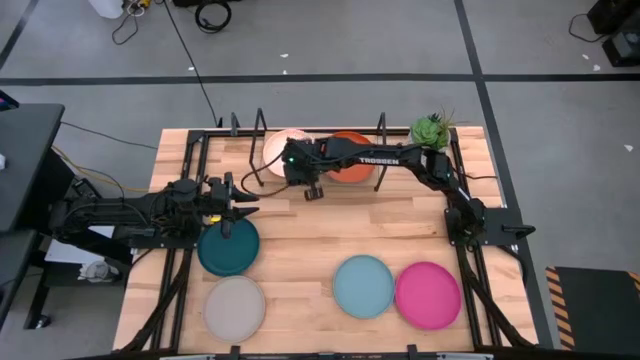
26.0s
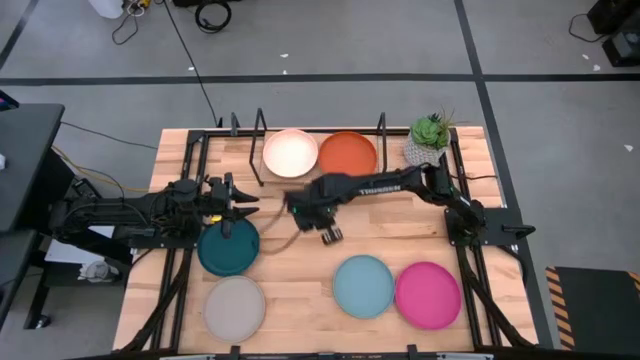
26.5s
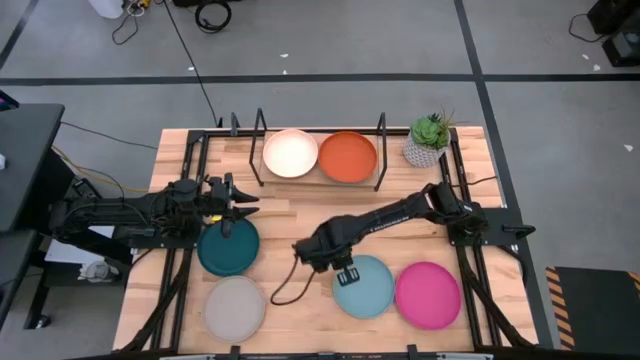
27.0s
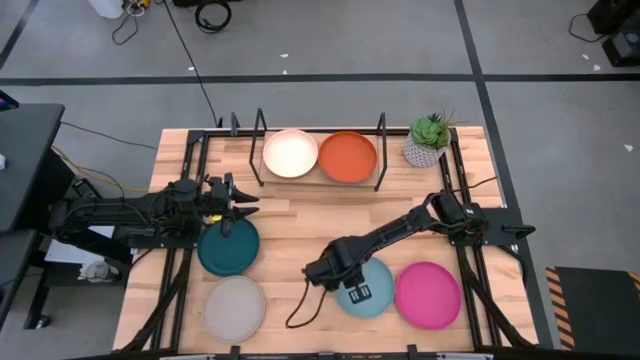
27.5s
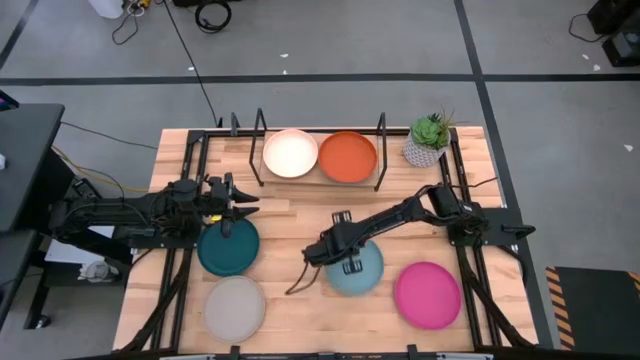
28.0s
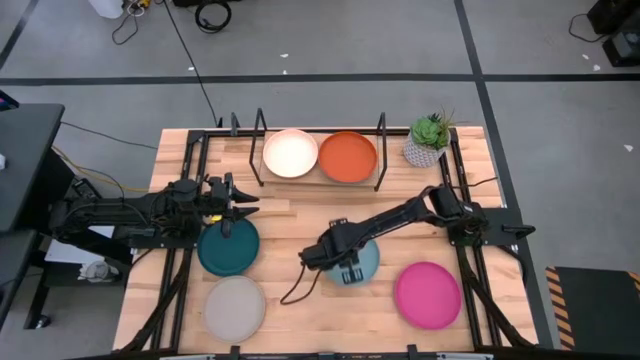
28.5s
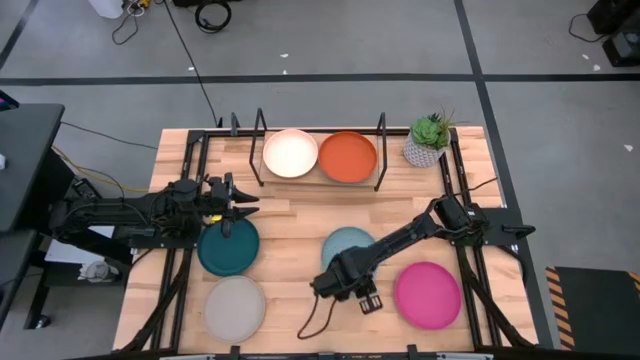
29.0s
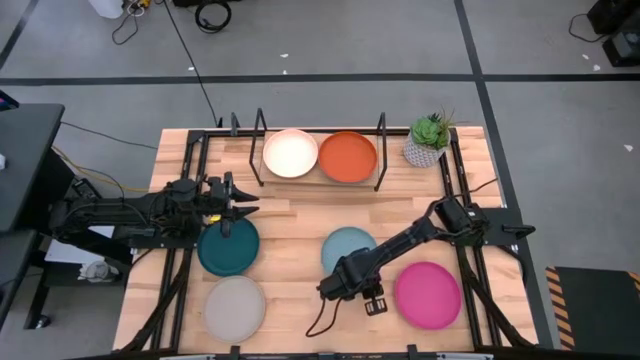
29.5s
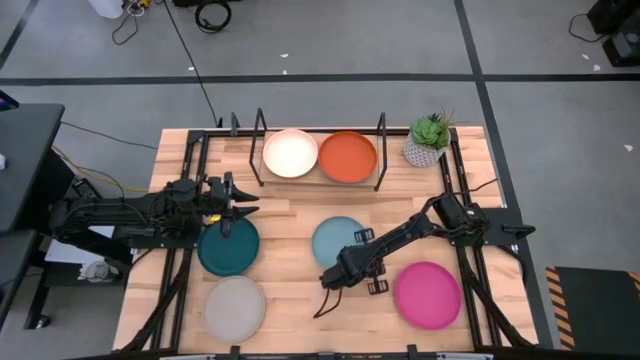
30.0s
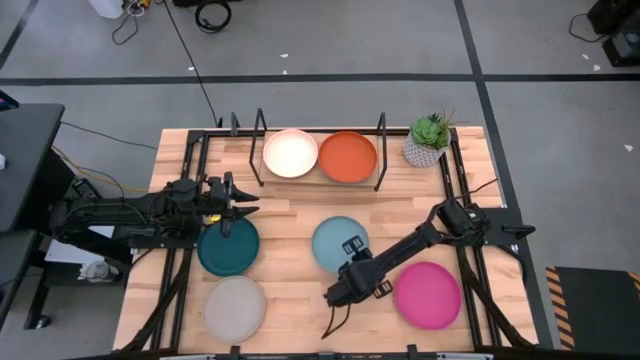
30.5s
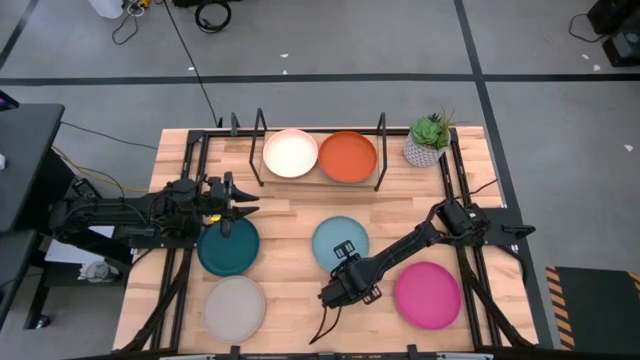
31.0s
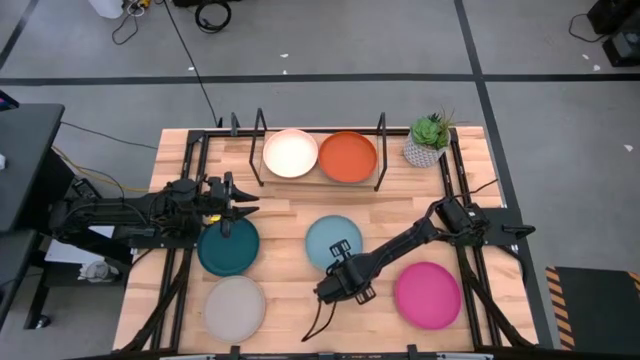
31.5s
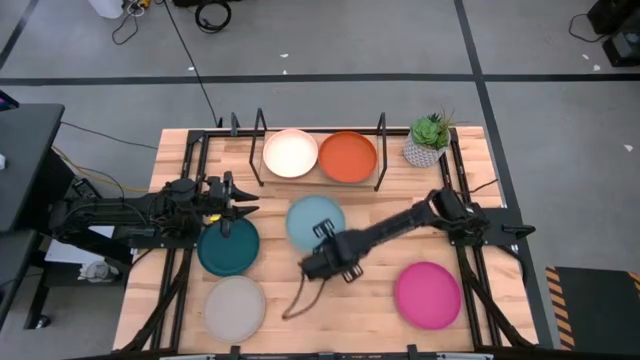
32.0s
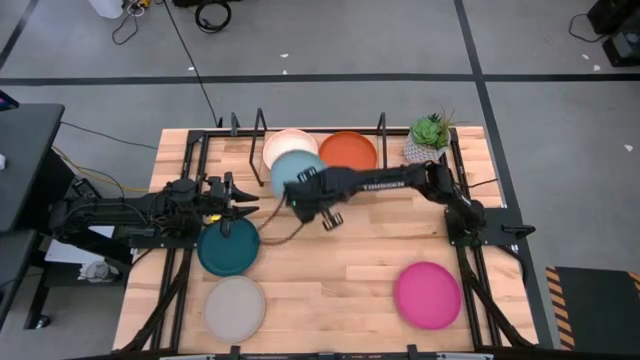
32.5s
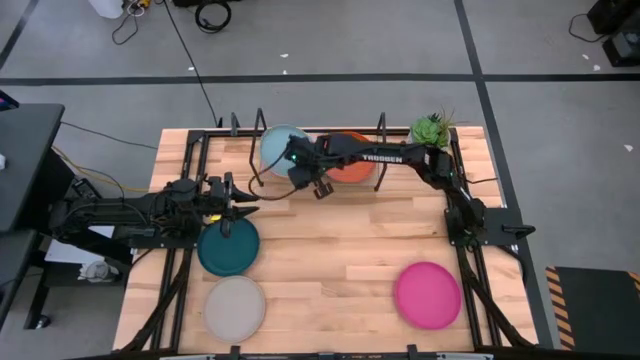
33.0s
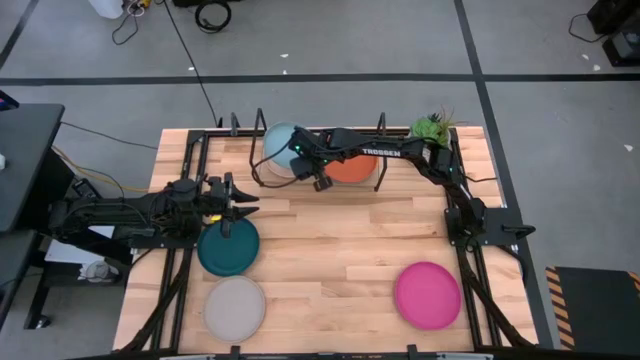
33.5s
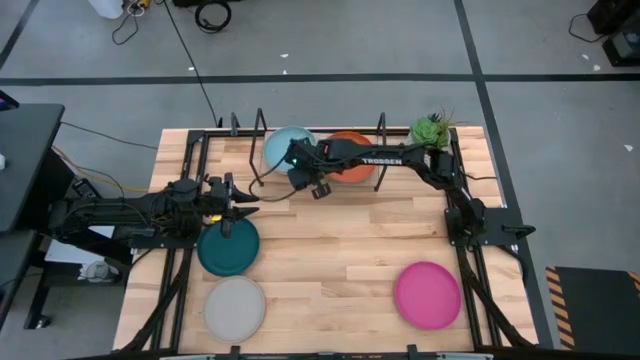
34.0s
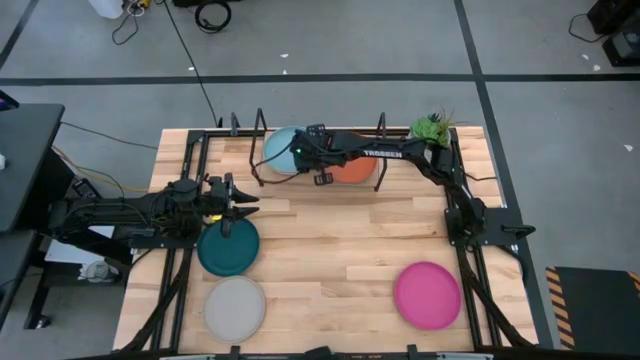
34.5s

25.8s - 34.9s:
Task: Place and stack plates onto a shelf
Stack the light blue plate on top of the light orange plate on the shelf

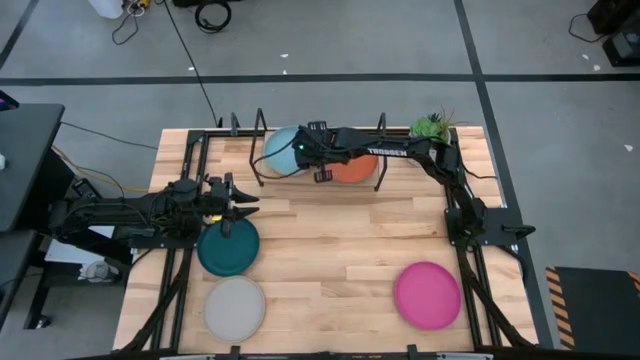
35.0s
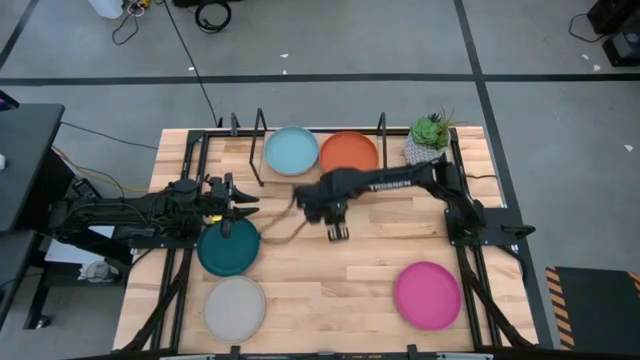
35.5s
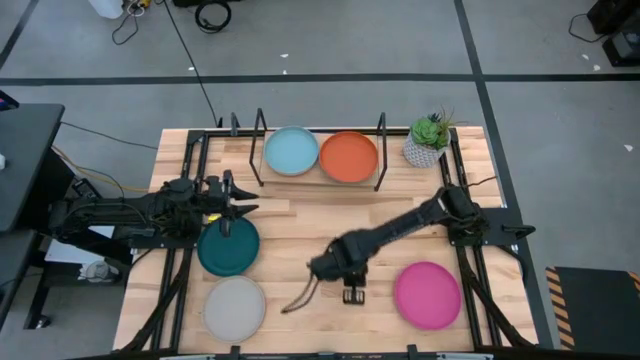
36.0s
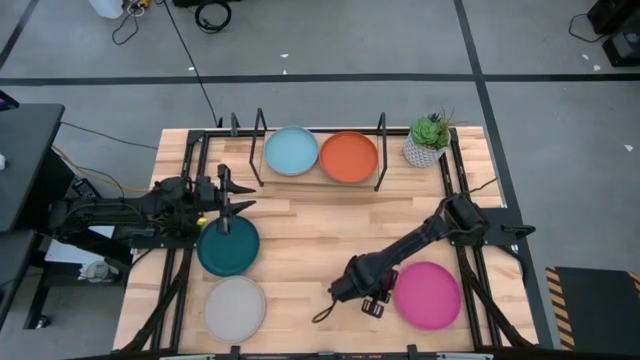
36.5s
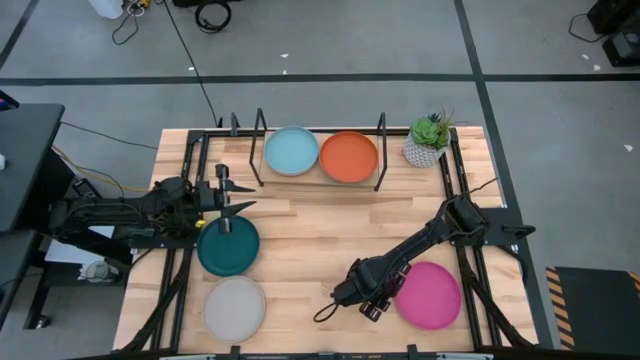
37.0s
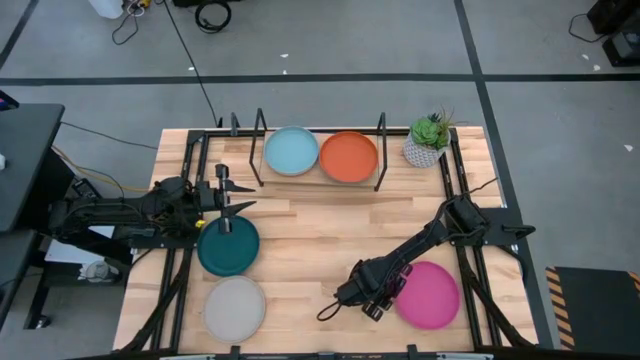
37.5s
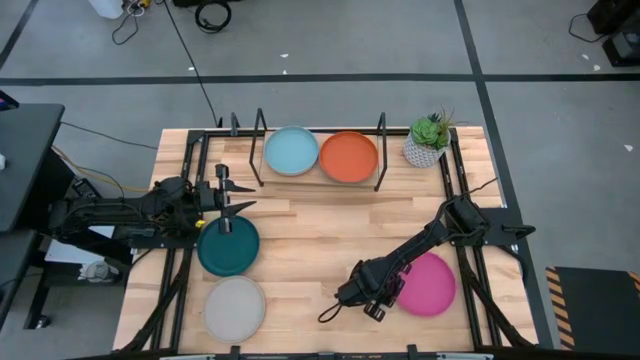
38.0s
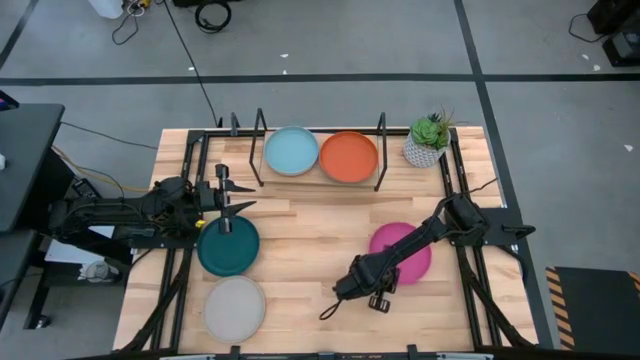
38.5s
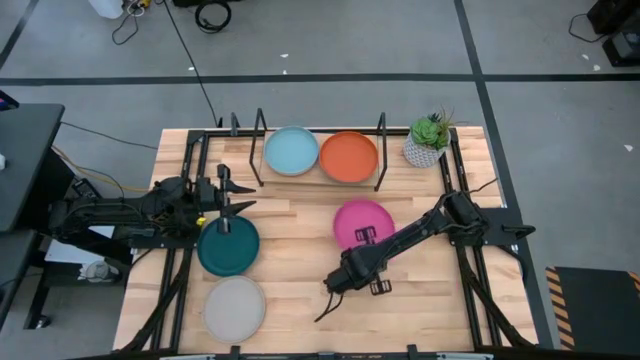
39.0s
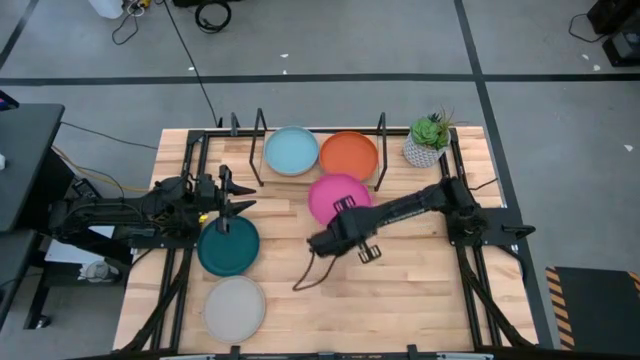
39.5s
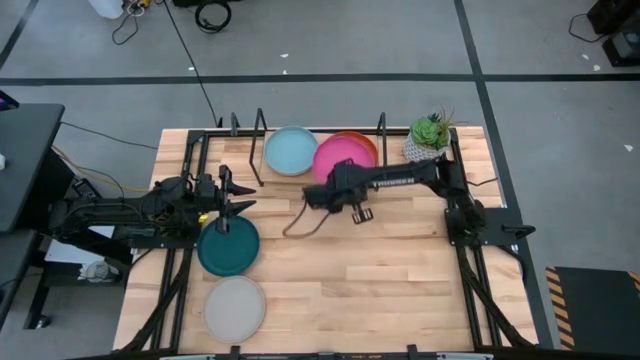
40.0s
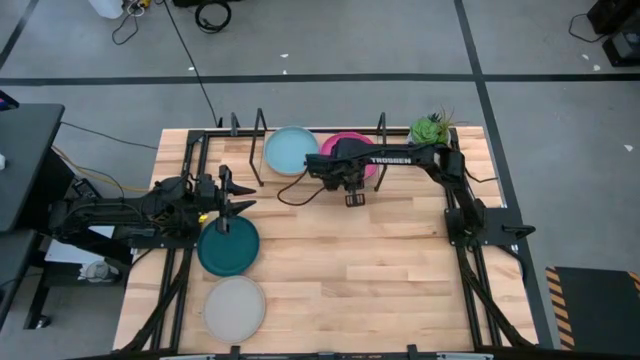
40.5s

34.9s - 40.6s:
Stack the pink plate on top of the orange plate on the shelf

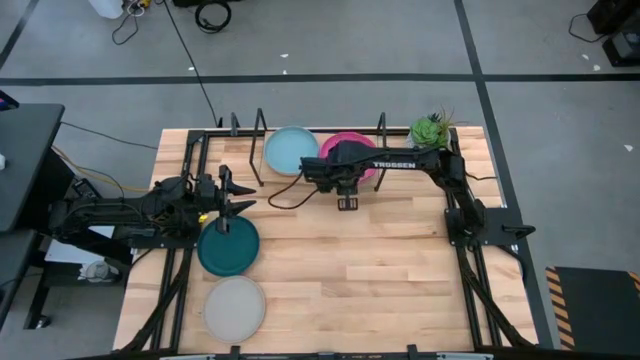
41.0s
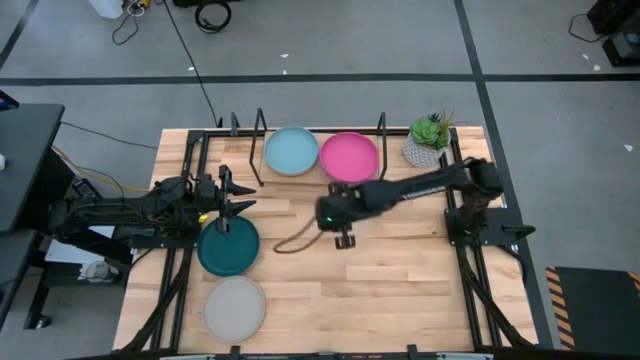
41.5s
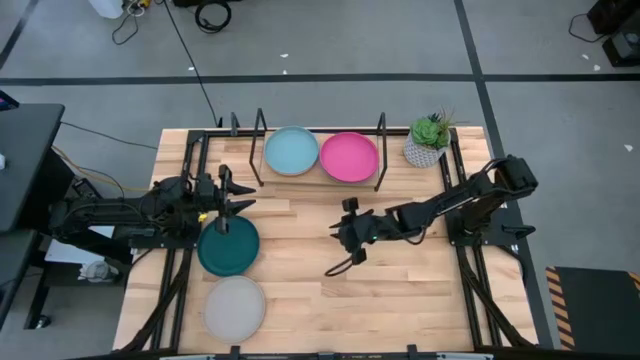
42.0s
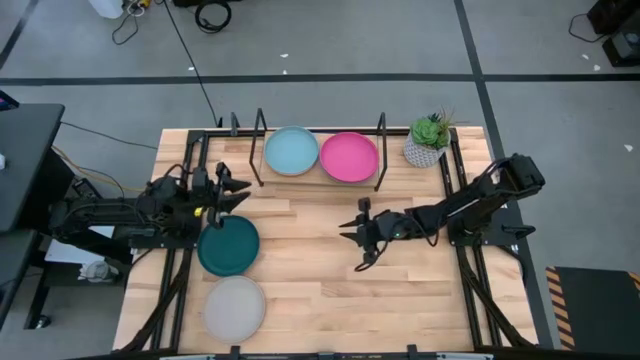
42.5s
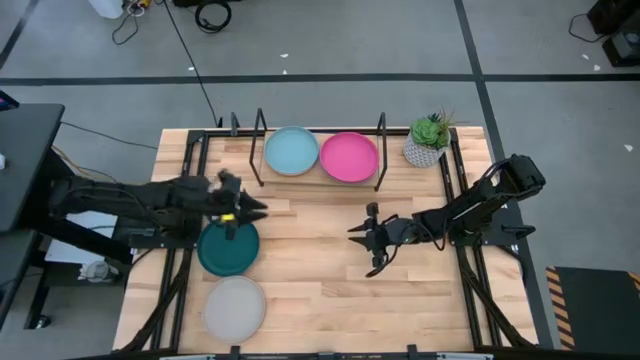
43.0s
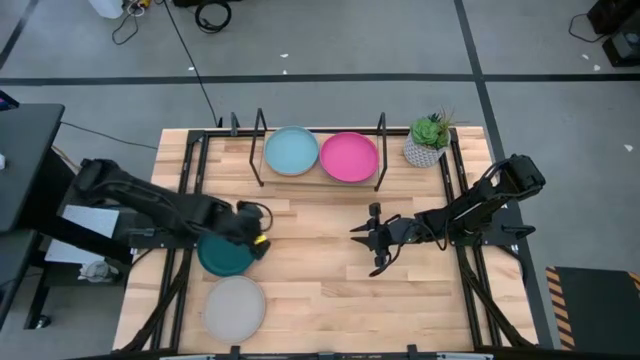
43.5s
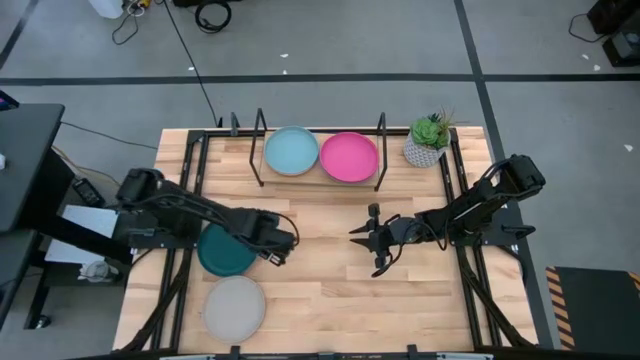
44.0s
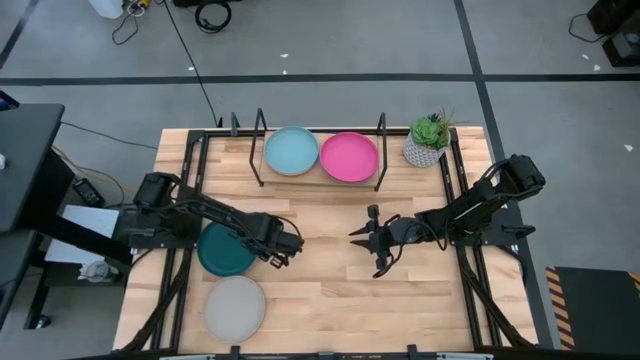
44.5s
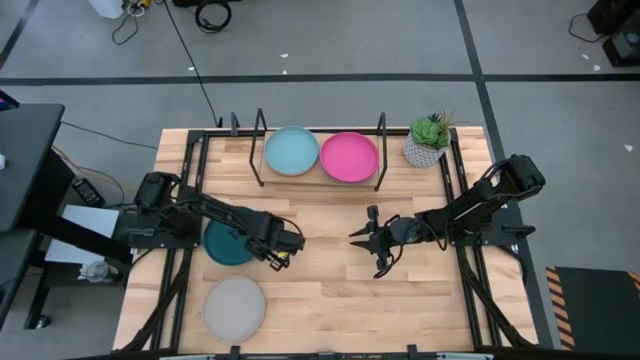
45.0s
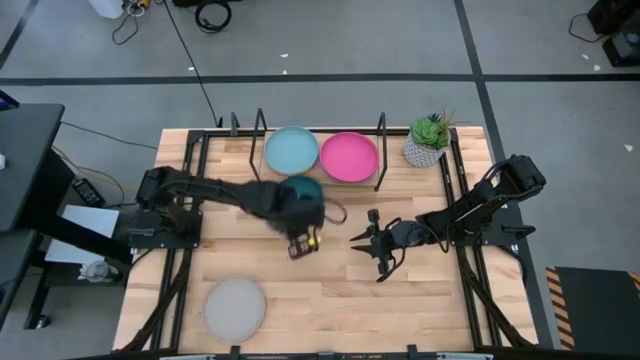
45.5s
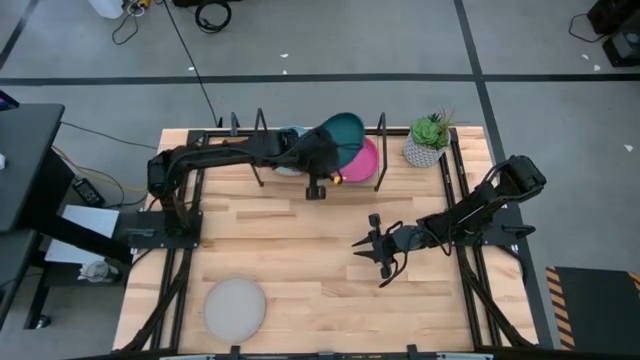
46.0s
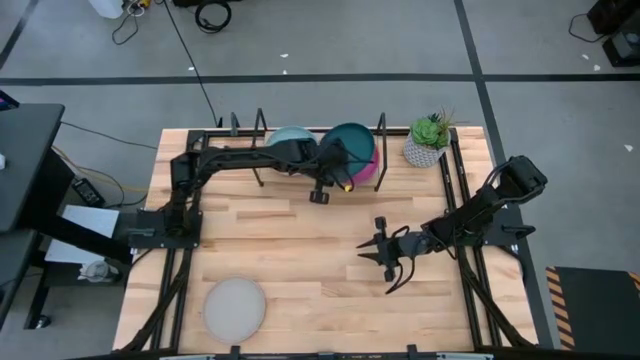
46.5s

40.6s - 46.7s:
Stack the dark green plate on top of the pink plate on the shelf
